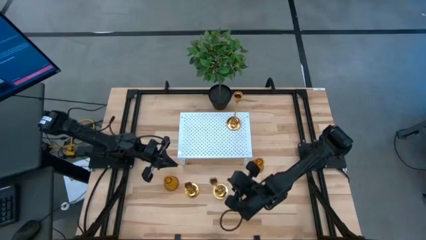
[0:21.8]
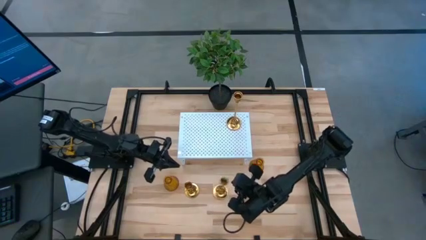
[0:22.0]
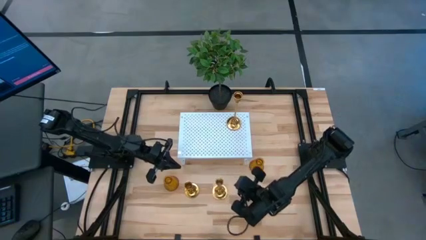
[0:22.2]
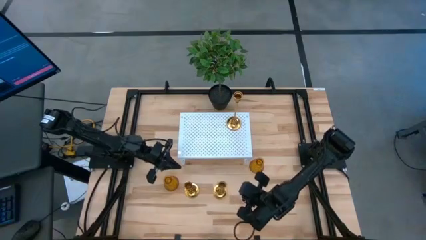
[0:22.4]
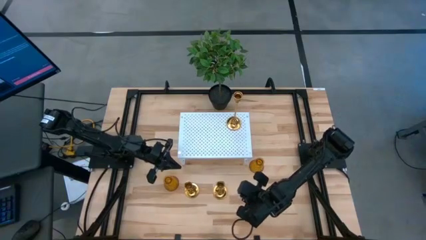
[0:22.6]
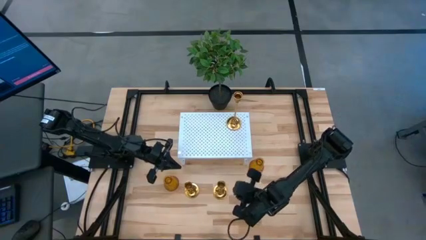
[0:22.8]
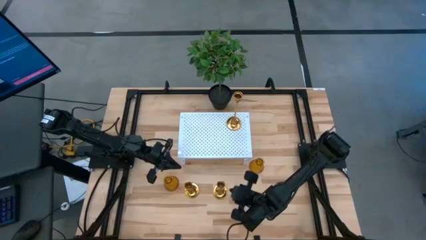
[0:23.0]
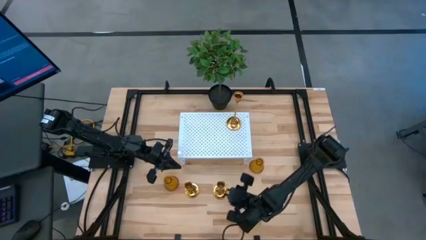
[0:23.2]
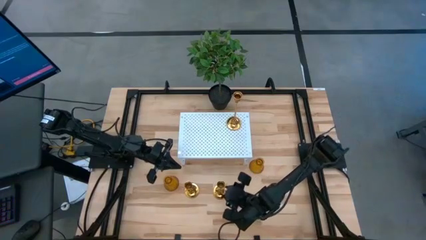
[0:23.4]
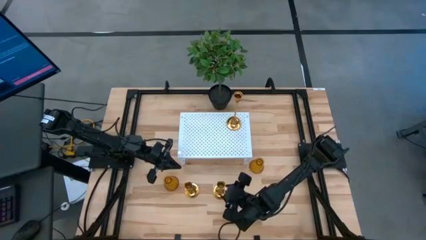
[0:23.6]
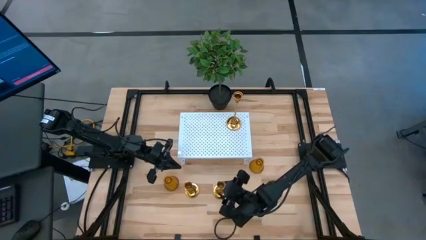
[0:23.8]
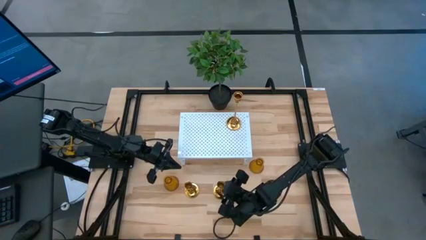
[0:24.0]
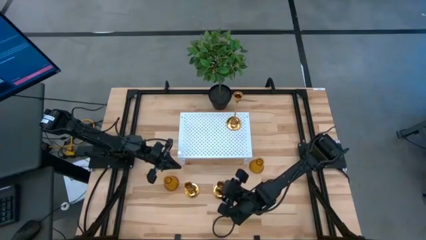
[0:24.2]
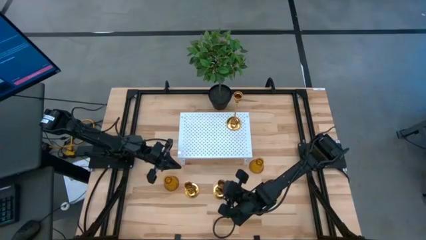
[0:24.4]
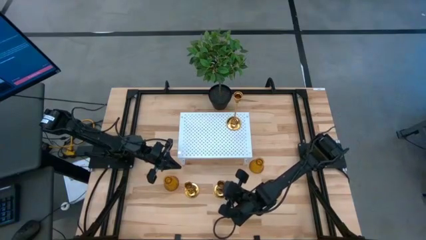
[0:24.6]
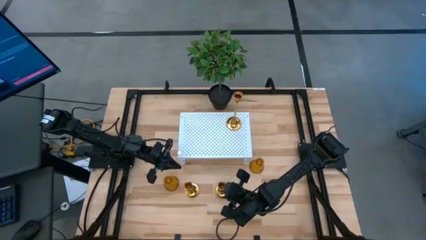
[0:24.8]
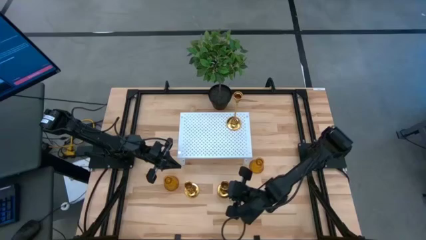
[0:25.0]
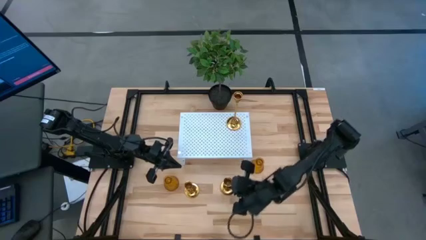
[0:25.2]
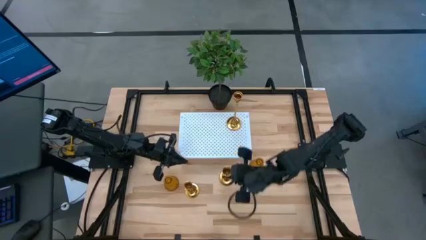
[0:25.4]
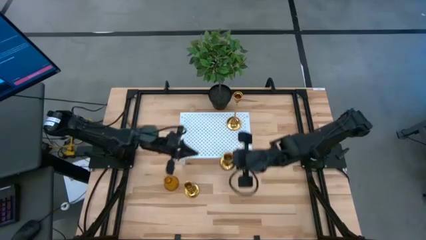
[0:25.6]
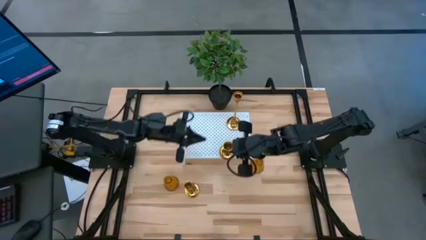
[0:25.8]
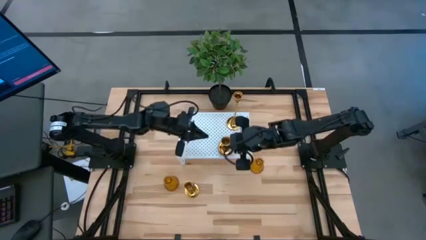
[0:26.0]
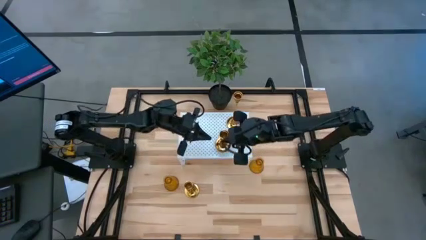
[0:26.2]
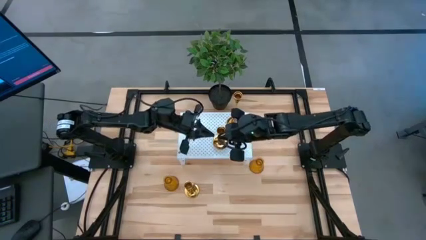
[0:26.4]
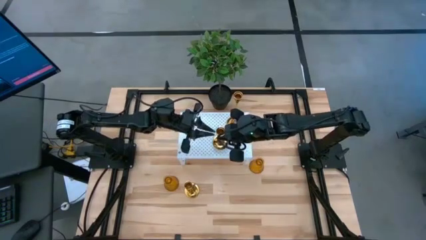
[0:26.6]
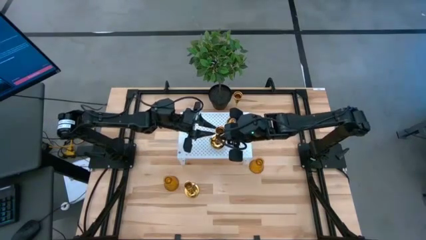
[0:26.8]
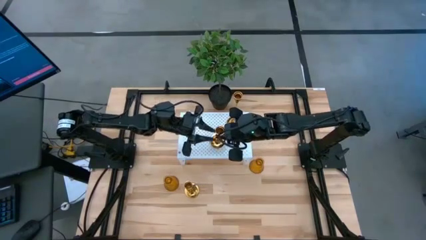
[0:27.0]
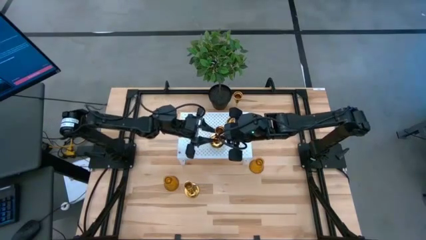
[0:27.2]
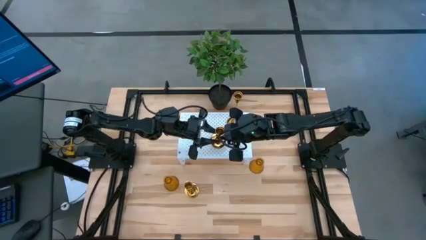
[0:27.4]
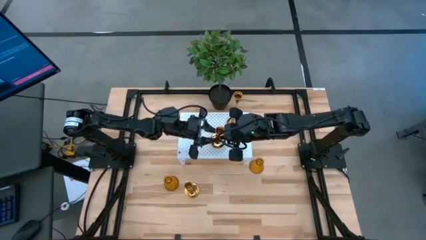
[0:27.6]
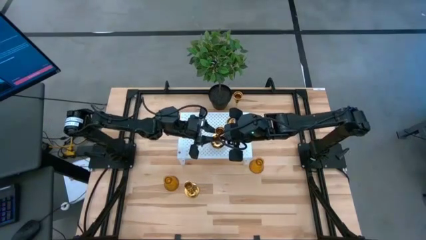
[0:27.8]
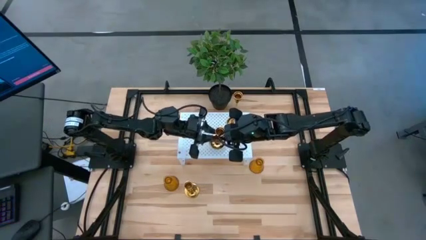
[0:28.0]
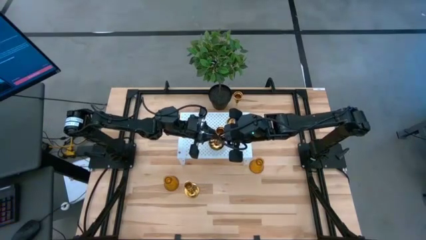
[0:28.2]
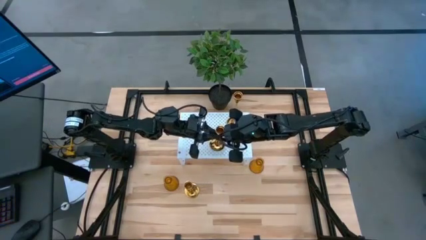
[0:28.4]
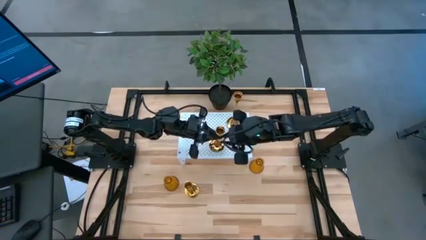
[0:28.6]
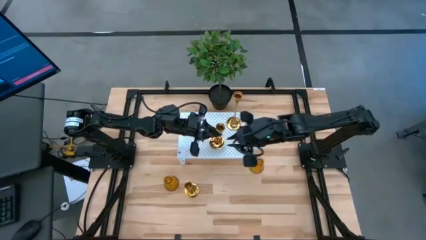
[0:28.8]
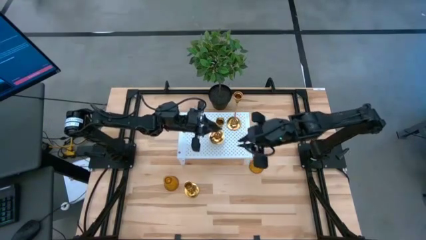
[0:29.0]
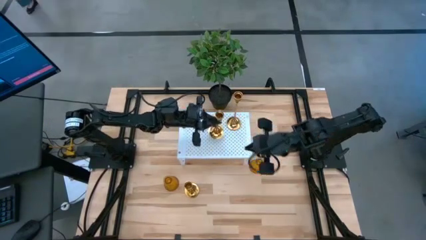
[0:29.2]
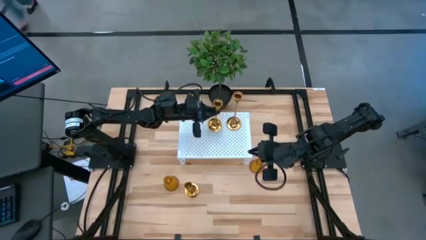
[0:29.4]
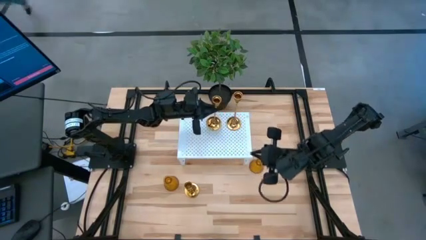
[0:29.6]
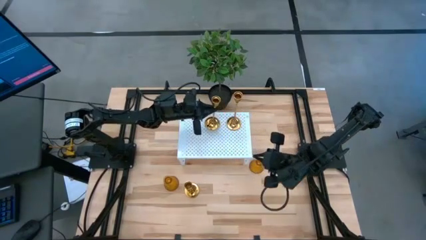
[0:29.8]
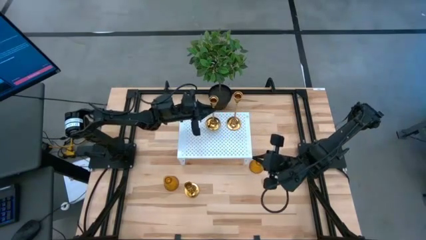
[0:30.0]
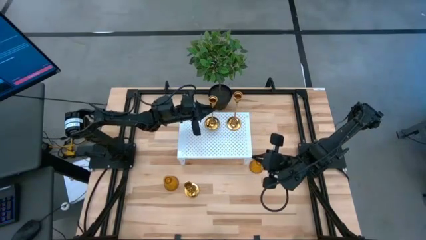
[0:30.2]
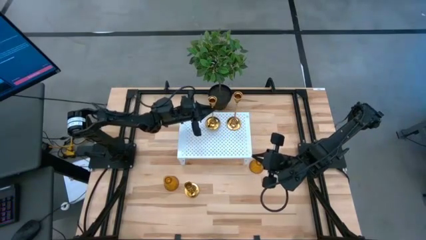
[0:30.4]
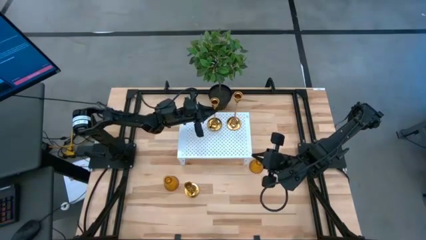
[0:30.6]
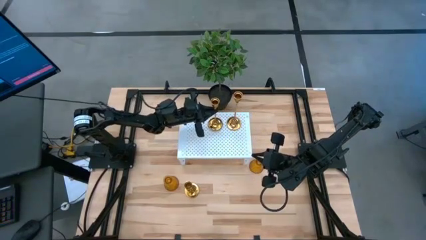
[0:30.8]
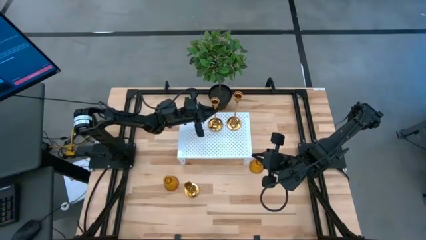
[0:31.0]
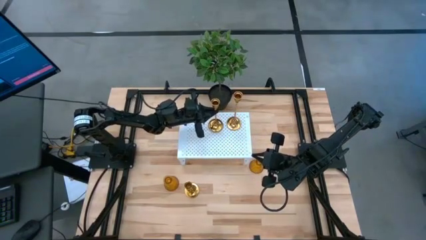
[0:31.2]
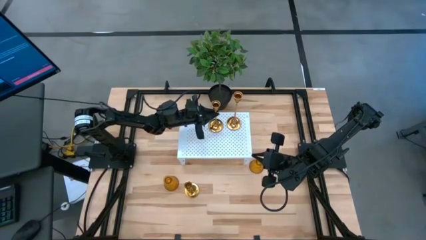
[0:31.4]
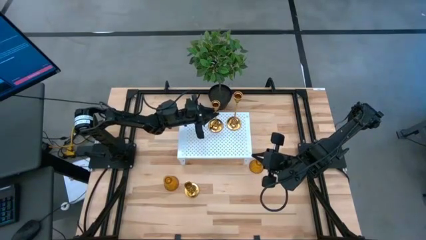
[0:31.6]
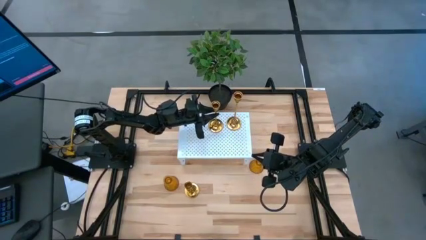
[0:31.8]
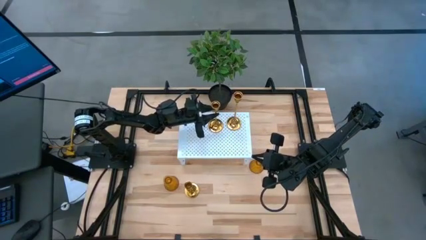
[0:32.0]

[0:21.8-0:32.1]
Task: Pick & Place candle stick holders
Put the right gold candle holder on the shelf

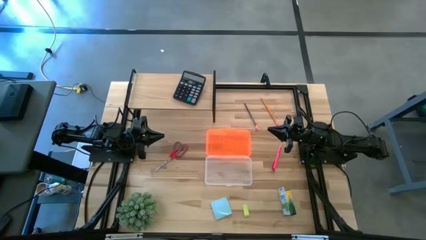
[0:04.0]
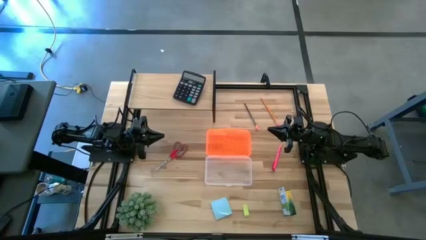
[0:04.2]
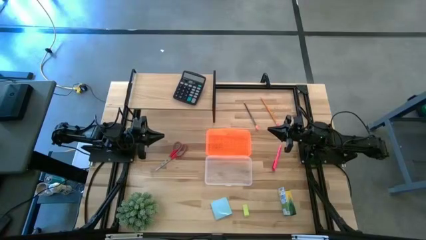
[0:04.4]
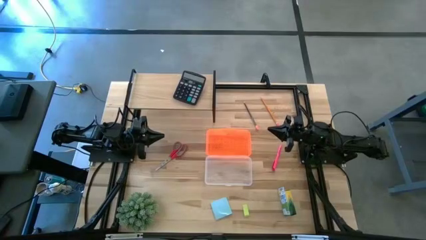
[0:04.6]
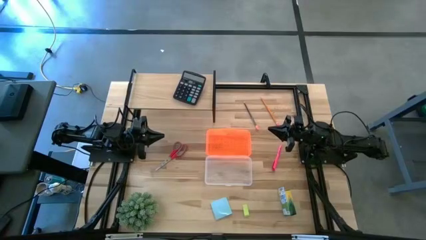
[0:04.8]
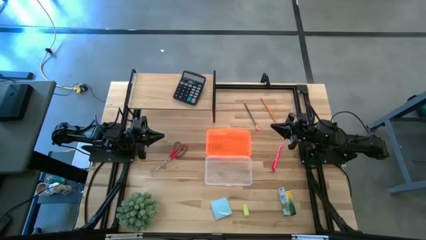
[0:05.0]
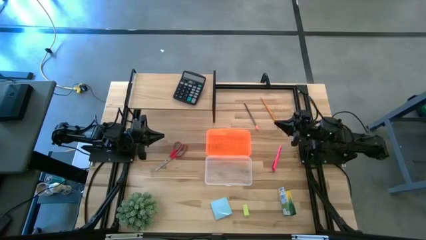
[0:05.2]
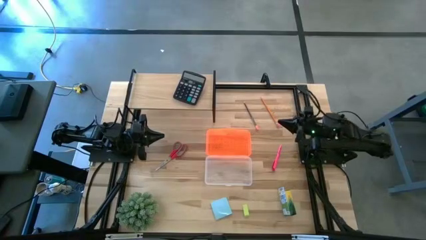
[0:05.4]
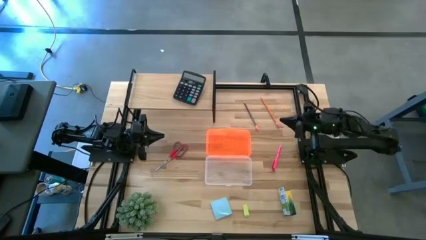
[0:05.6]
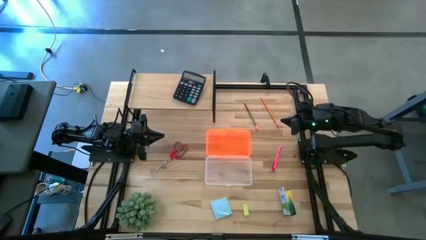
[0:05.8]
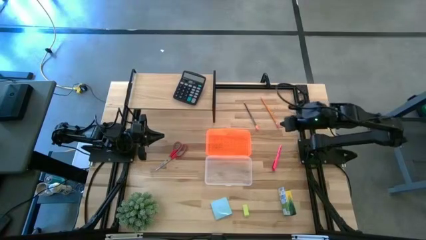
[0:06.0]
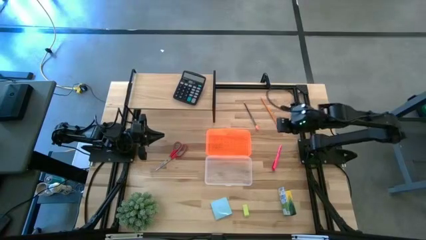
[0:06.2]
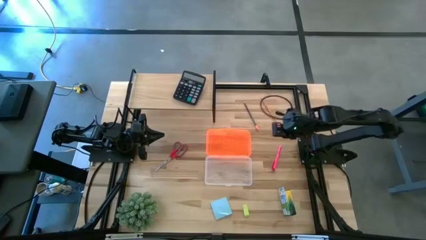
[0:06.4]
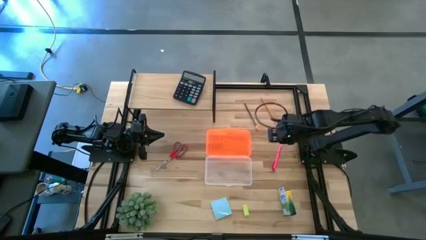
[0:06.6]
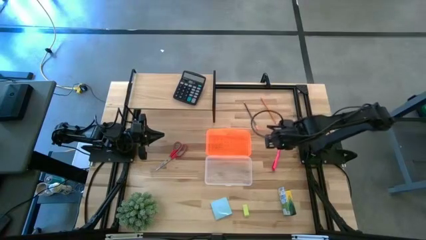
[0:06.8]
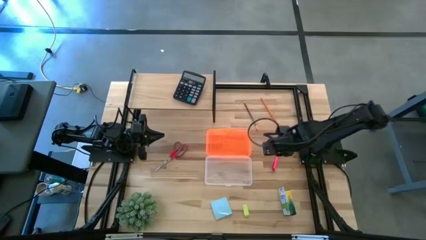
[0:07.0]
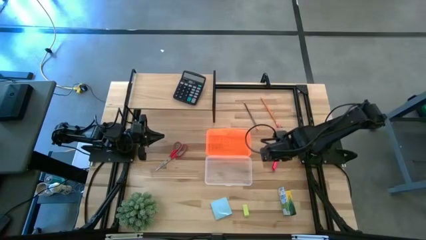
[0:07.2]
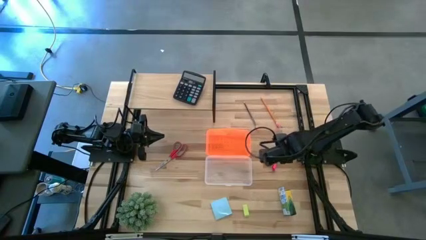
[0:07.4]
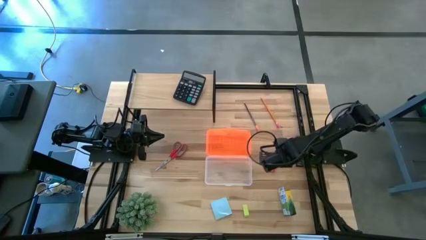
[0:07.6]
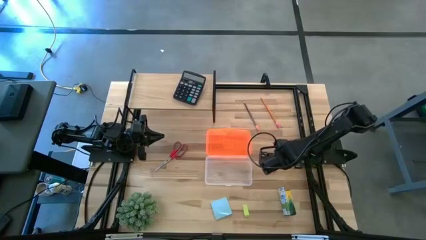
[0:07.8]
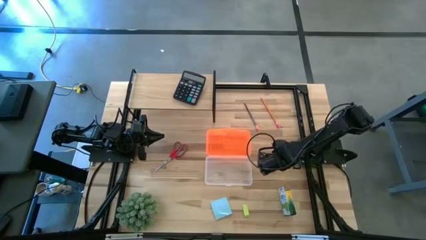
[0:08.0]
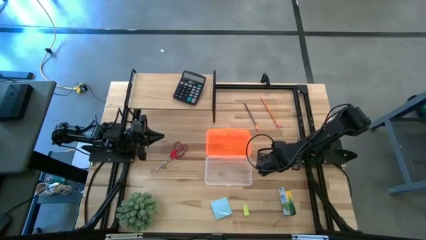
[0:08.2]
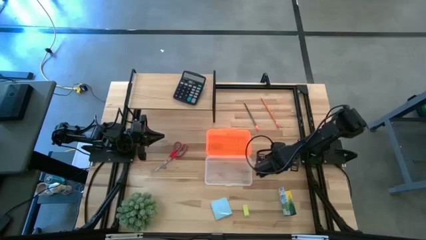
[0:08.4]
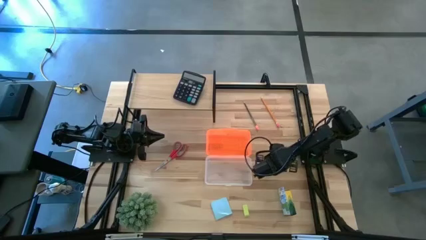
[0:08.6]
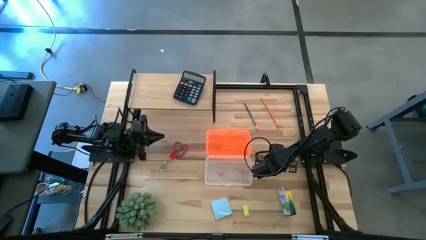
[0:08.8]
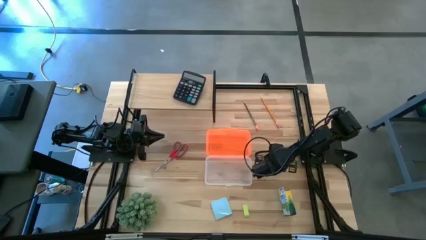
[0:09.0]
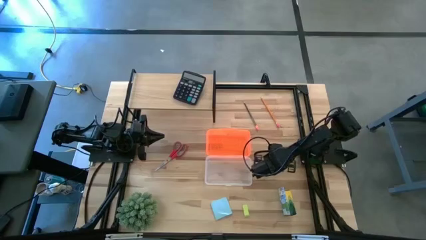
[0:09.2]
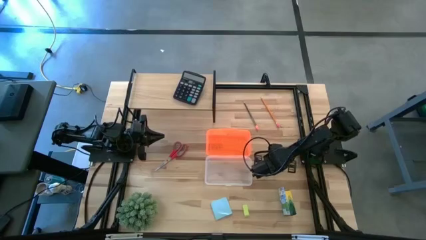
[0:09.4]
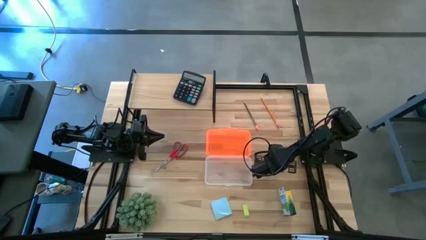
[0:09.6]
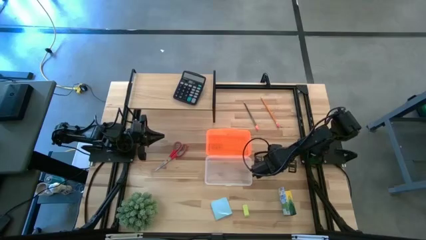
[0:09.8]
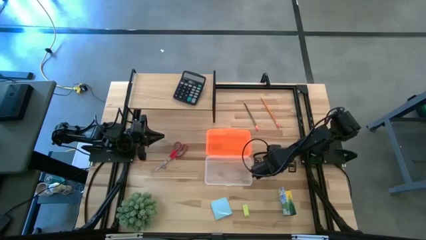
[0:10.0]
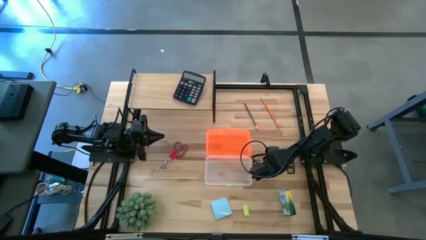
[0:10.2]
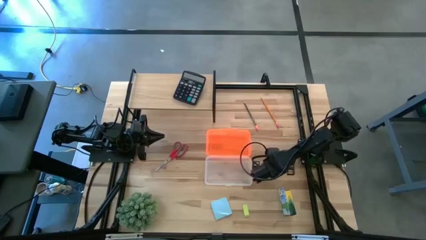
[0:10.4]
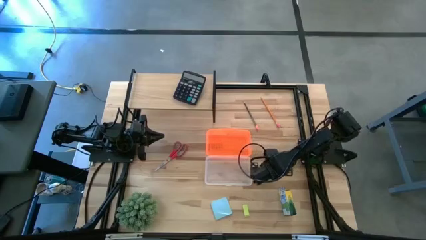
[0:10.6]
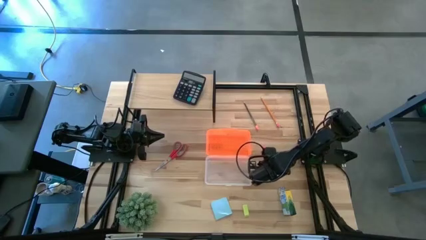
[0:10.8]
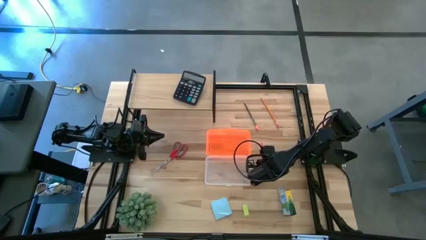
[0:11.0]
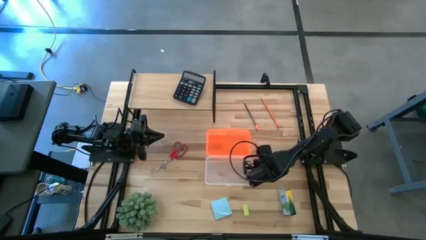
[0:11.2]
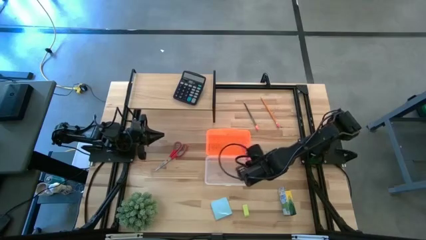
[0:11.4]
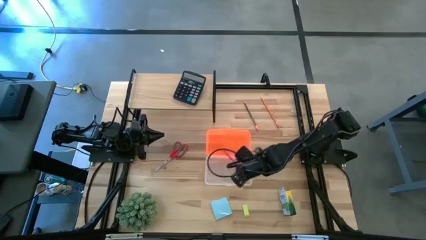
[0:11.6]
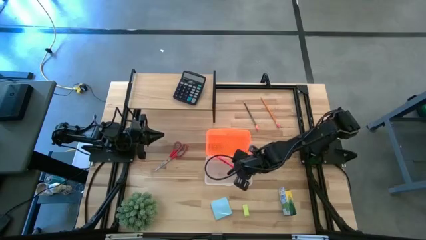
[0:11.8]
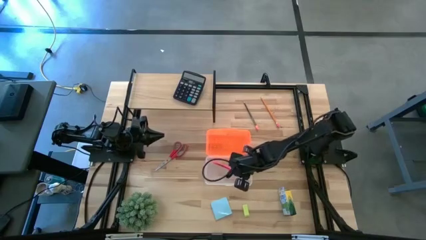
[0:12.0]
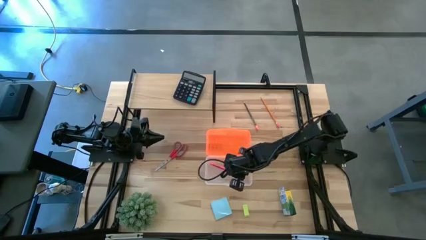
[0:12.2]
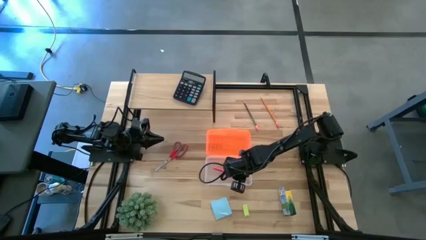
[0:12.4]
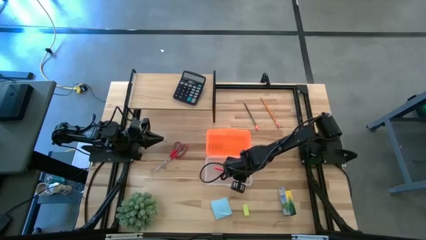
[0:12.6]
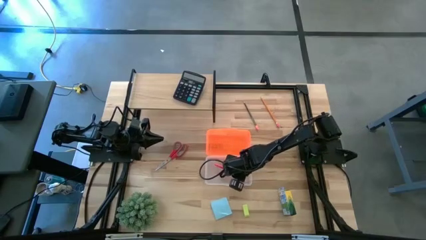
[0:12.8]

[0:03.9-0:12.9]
Task: Pack school essentials
Put the pen into the supply box
